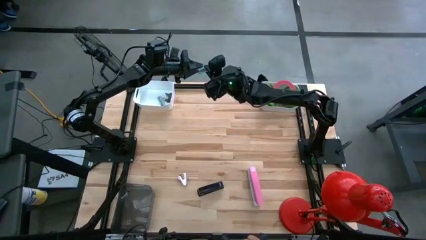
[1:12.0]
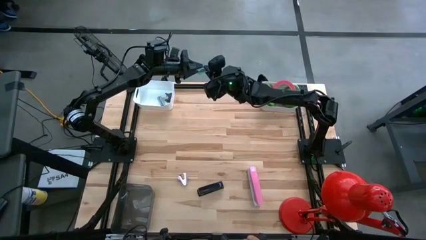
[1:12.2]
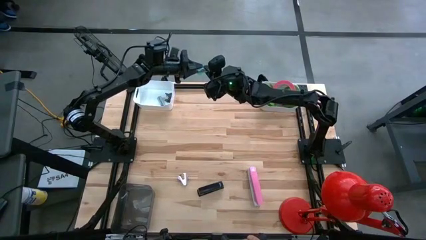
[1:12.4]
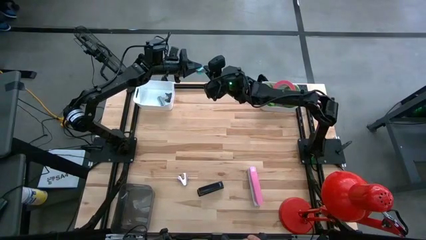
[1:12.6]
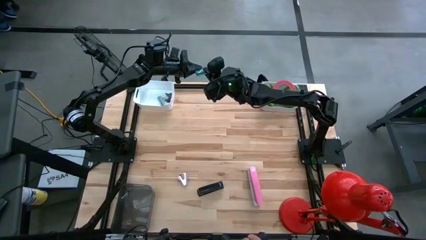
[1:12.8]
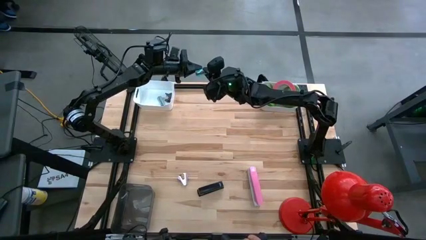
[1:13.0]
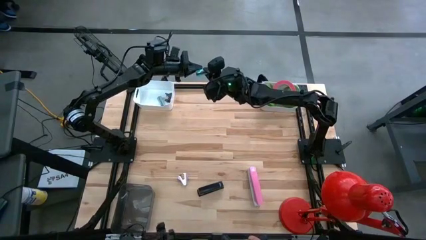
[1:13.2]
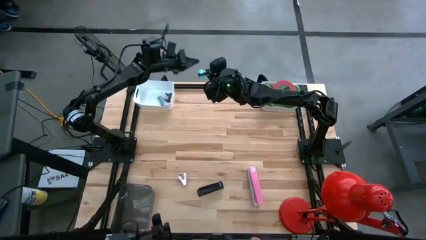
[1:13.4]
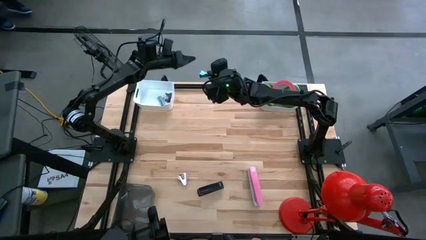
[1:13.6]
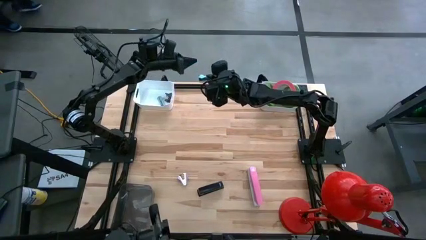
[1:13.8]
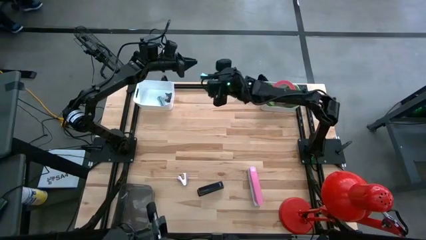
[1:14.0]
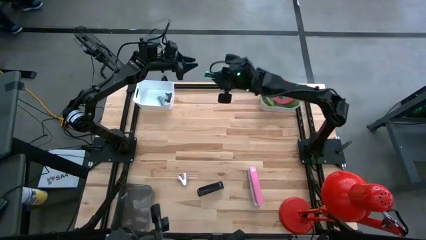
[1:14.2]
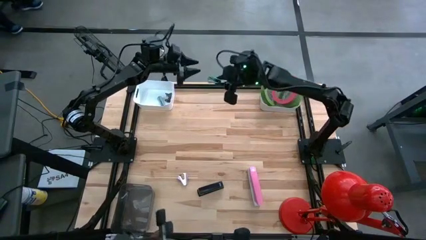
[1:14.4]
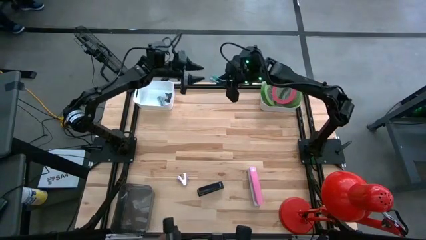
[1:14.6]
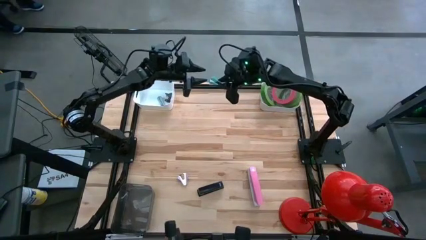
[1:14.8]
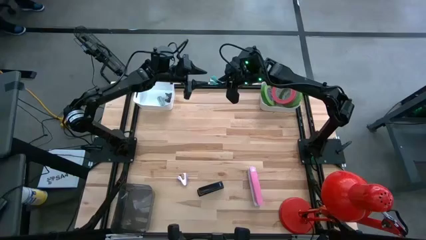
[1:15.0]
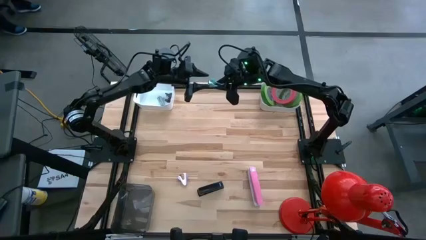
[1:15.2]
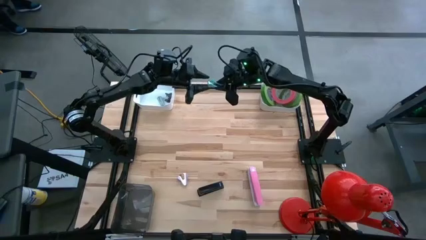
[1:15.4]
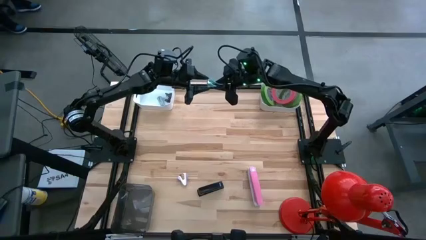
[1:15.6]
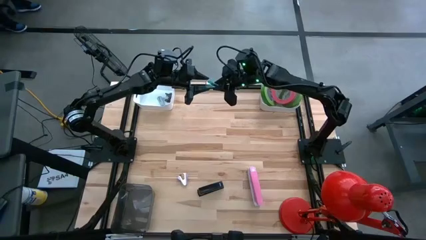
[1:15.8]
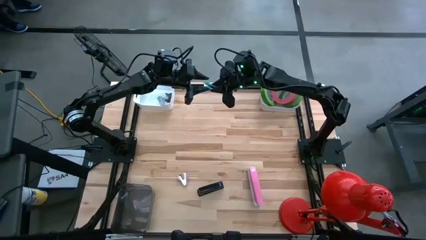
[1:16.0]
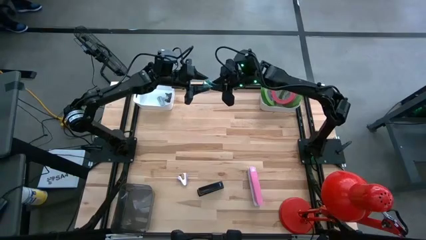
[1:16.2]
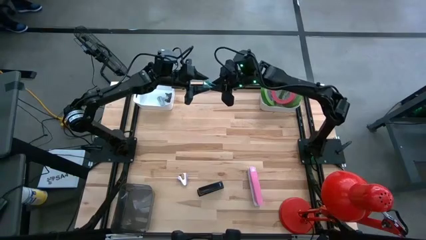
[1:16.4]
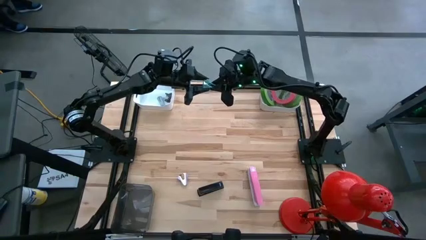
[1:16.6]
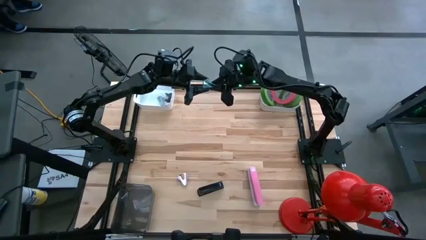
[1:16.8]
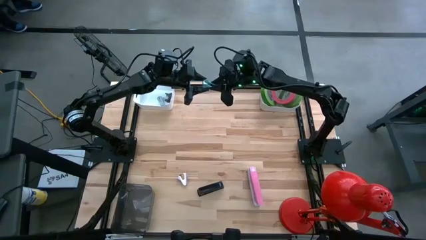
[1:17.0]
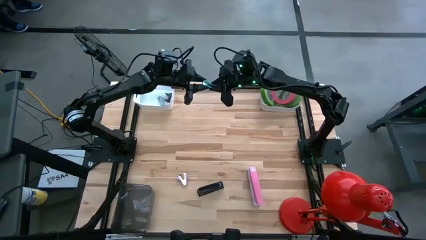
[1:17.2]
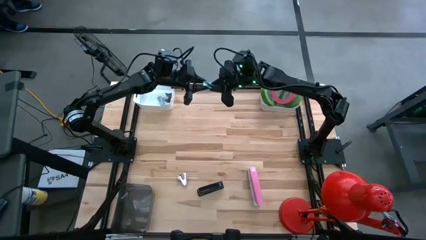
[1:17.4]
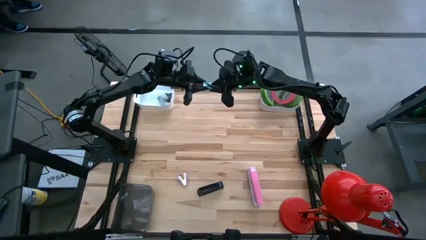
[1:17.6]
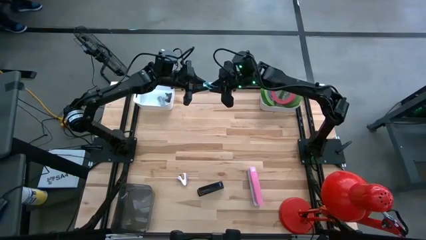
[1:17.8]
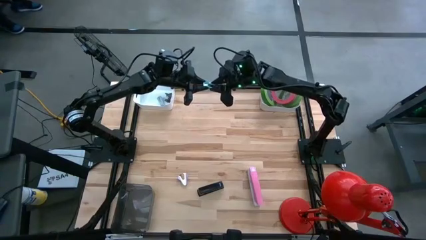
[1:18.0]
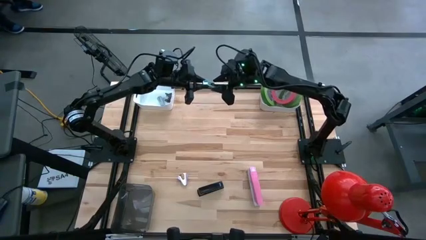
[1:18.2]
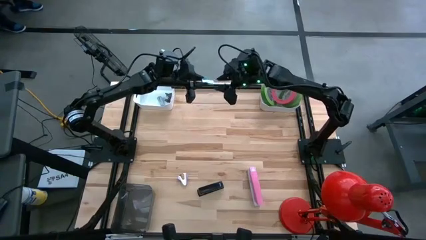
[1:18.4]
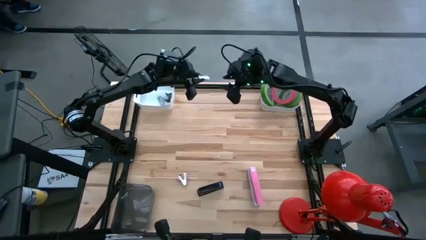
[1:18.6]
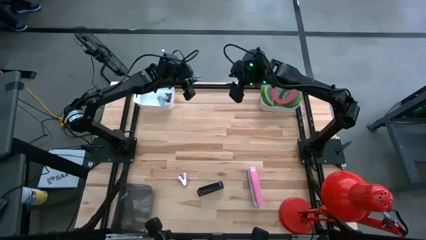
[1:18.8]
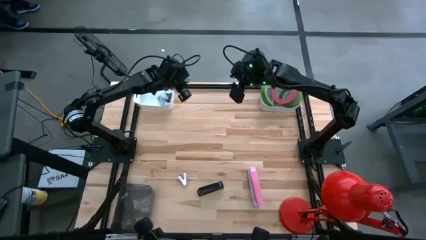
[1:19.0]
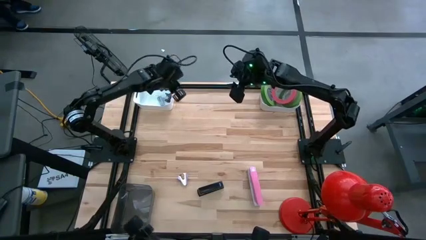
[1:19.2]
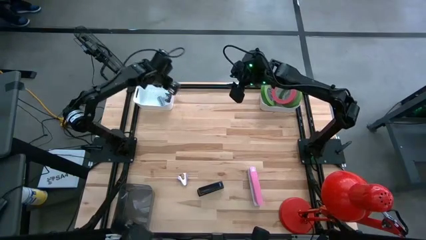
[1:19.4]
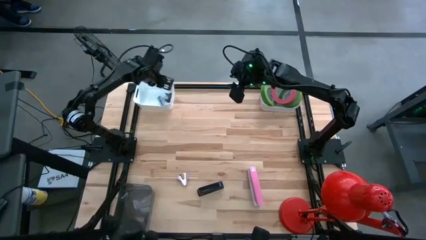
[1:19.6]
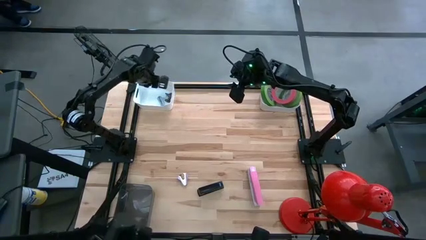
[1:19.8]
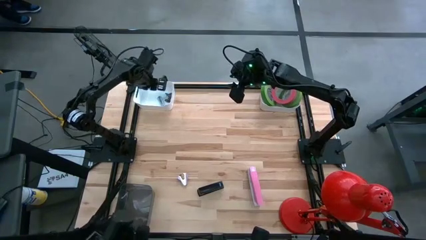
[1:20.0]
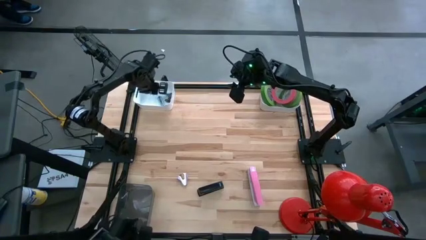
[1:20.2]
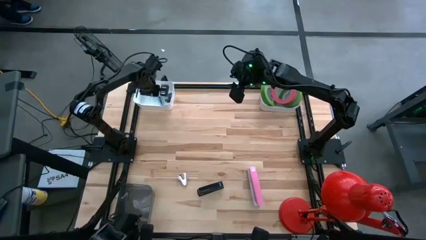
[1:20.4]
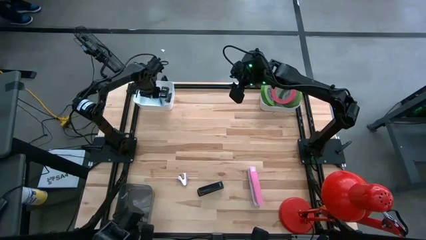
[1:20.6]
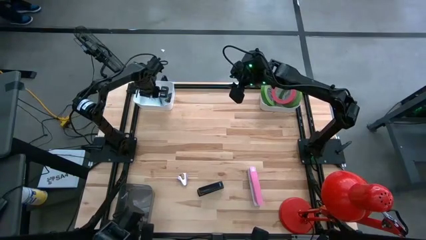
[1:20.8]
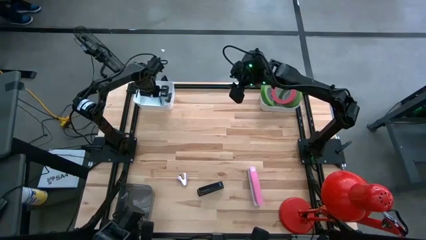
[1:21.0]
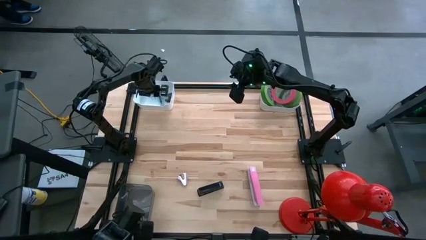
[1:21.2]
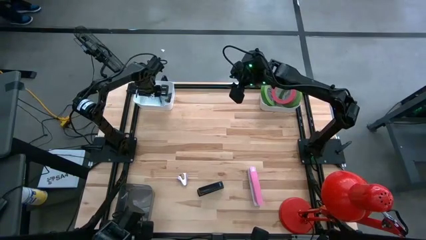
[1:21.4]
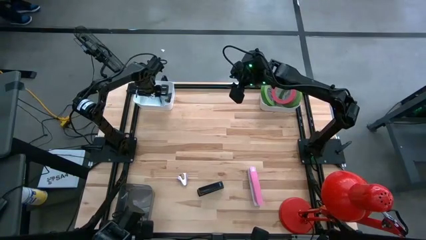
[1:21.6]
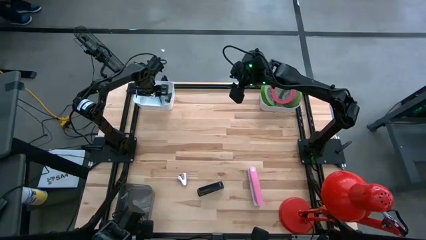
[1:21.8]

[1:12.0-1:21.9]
Task: Pick and place Stapler, Stapler remover, tape
Put the light green staple remover into the left white bin

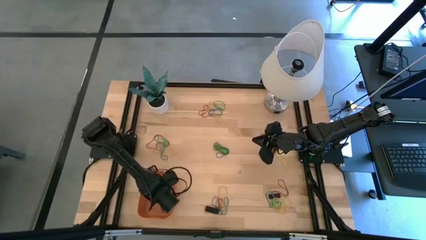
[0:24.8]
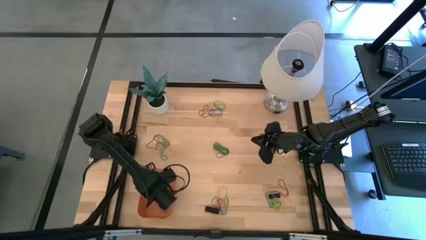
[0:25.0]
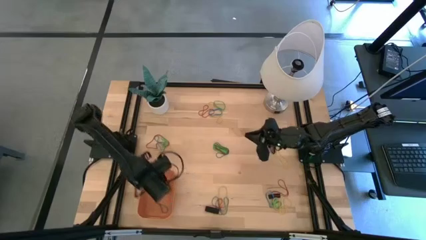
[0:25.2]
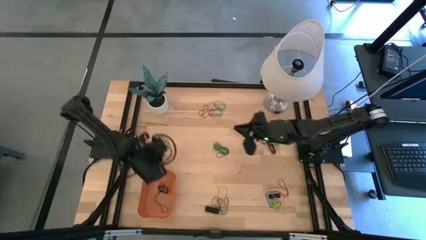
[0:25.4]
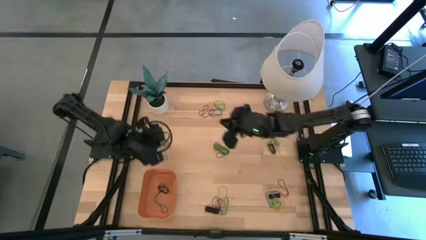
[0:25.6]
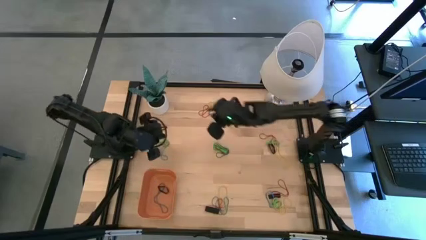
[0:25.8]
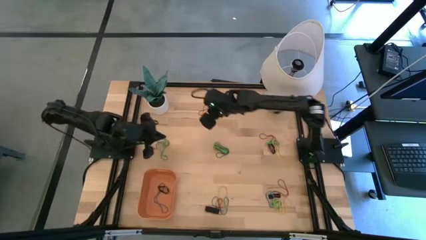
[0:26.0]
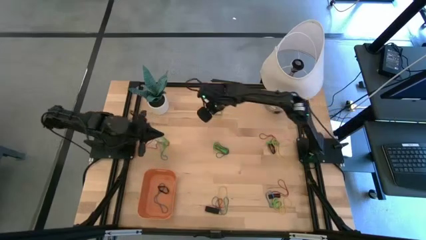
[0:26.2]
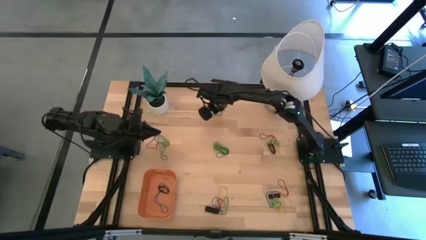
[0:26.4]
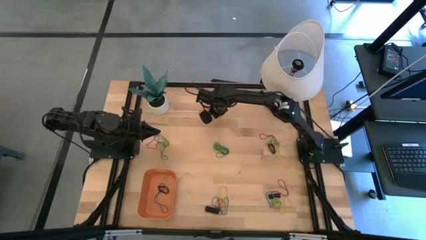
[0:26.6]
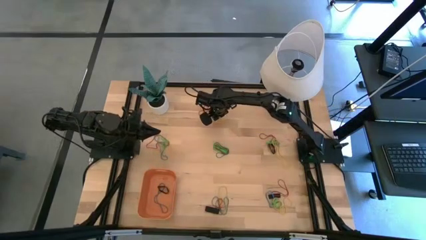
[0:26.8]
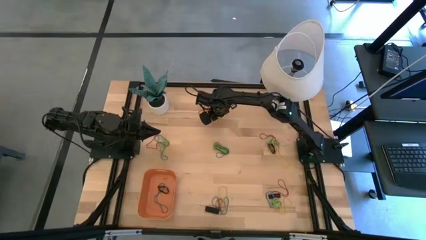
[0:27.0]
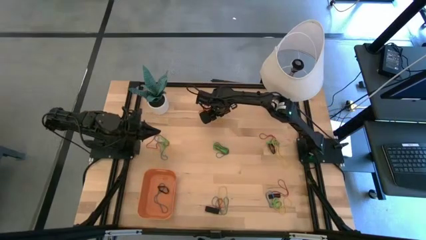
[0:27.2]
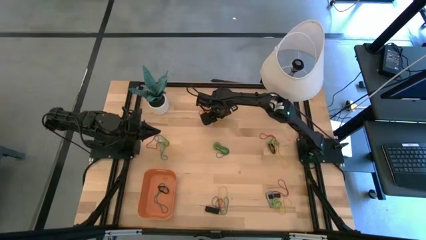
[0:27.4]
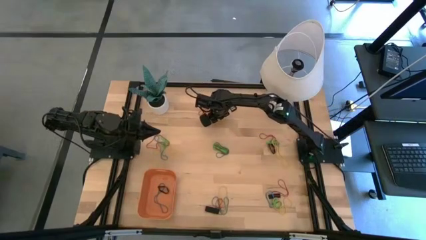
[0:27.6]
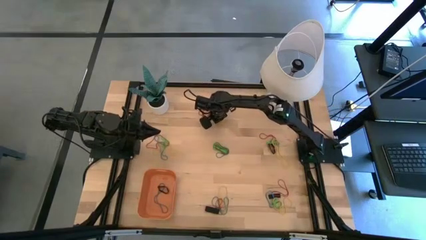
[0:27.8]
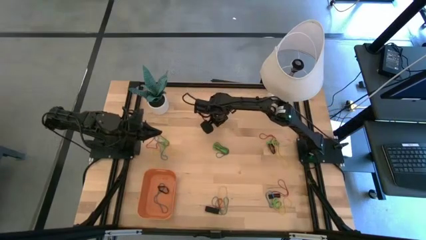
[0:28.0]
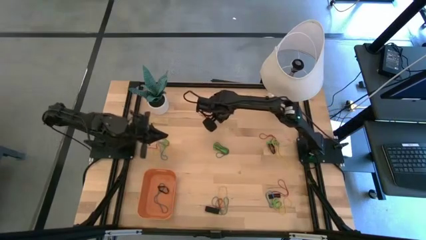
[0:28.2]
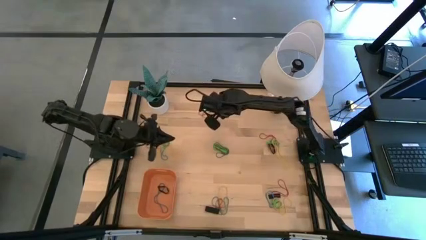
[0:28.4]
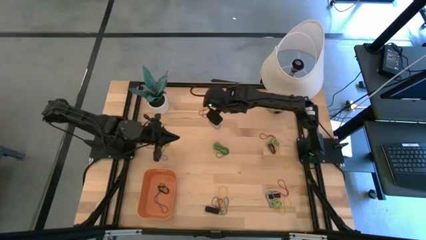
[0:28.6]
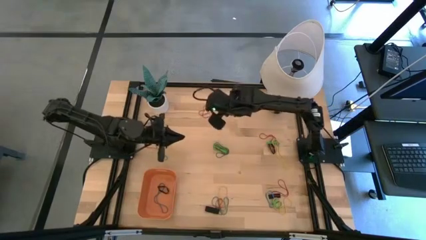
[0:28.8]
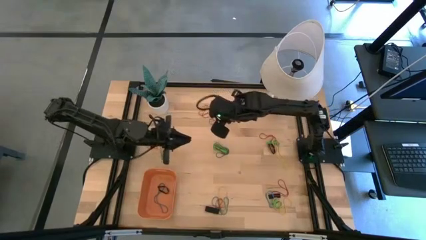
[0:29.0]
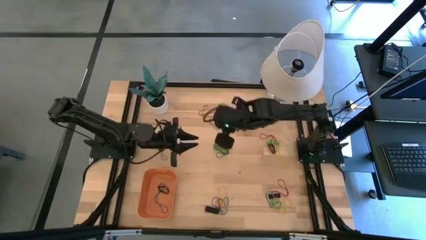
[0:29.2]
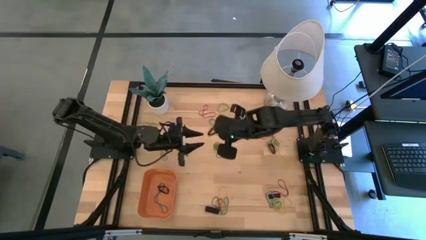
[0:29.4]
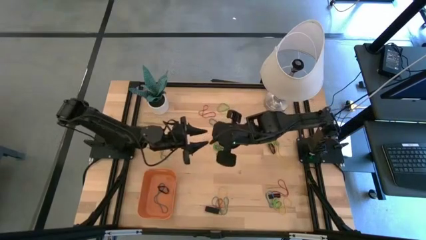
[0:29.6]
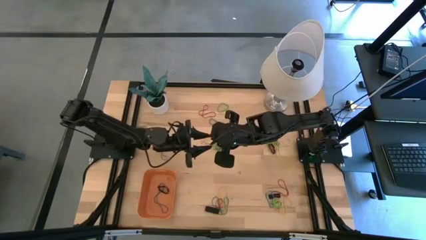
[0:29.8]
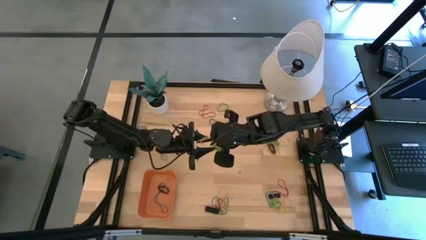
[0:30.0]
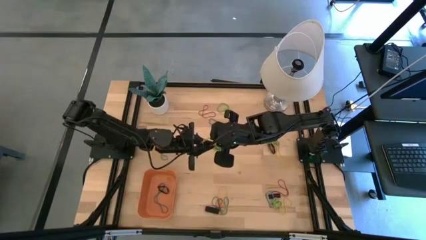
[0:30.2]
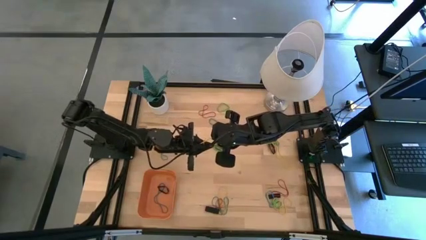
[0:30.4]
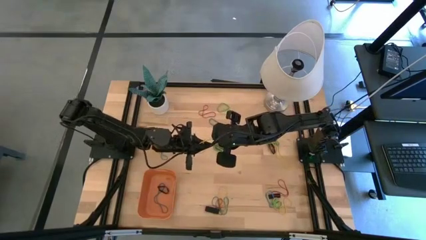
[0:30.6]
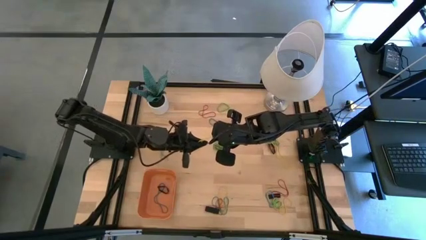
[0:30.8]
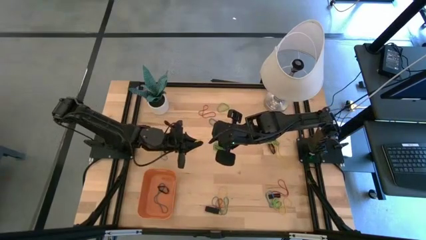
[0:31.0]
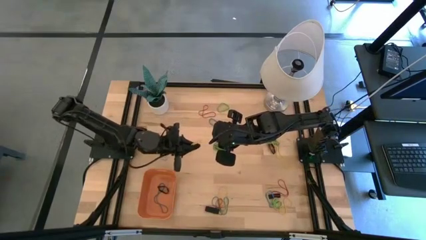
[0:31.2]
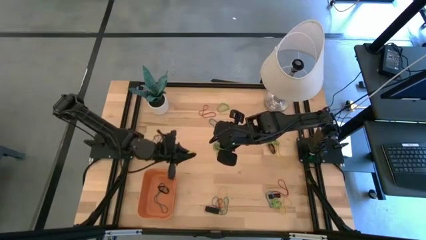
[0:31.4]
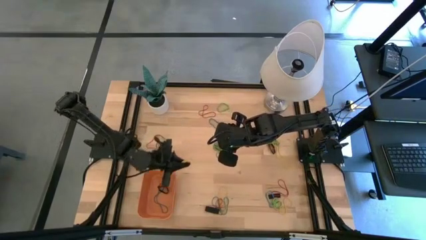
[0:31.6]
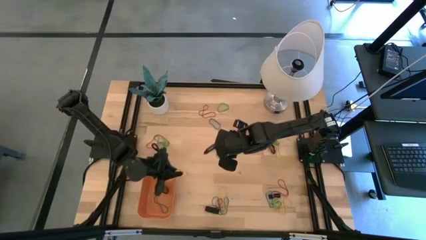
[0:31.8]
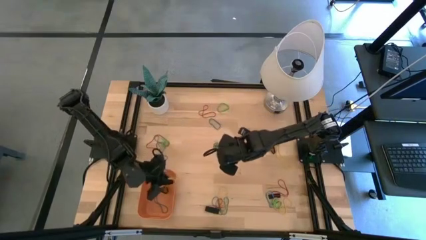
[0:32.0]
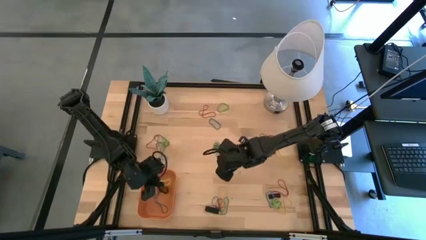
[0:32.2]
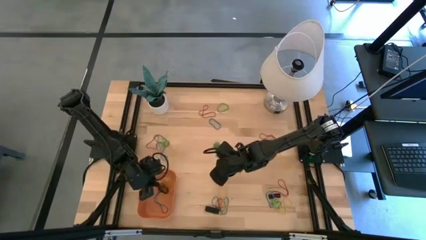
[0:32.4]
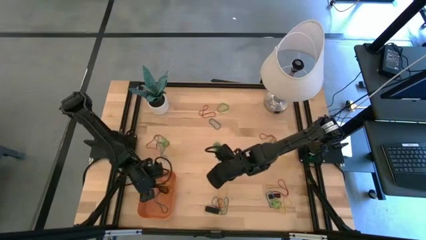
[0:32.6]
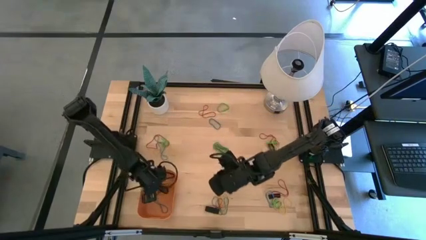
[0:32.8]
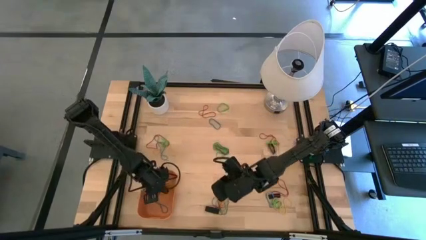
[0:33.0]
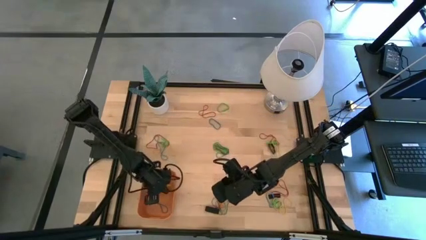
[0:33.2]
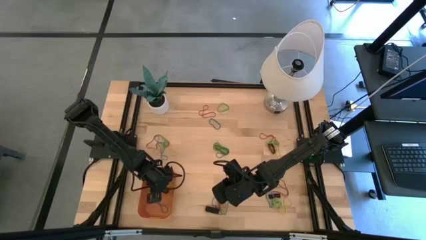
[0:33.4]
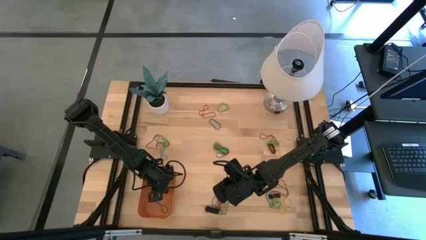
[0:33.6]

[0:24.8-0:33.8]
Task: Pick and place rubber bands into bin
Put the top yellow rubber band into the orange bin
